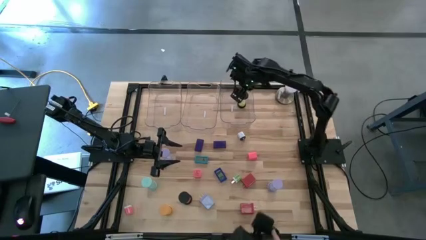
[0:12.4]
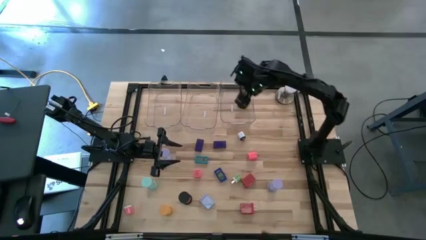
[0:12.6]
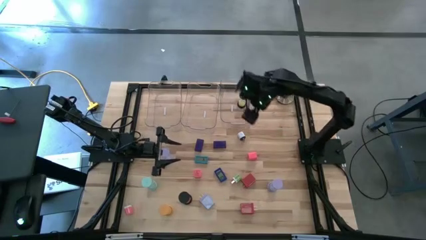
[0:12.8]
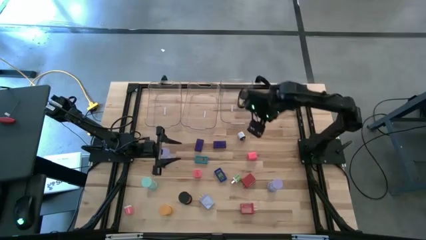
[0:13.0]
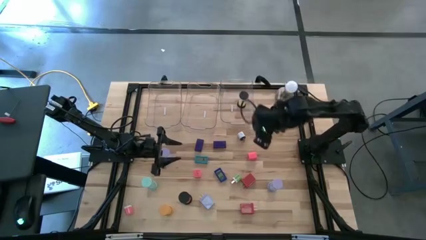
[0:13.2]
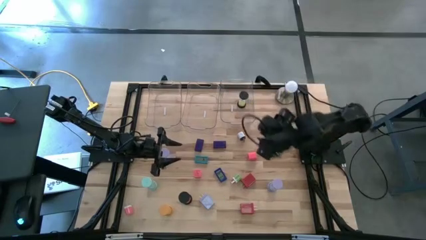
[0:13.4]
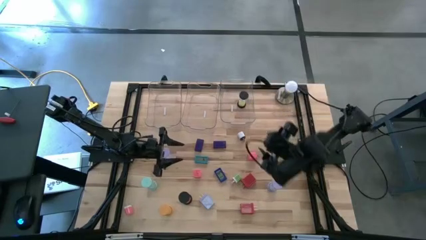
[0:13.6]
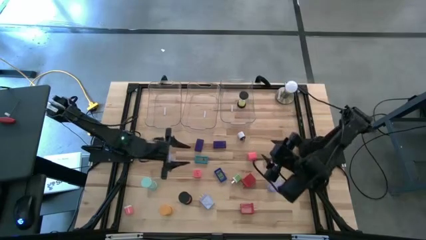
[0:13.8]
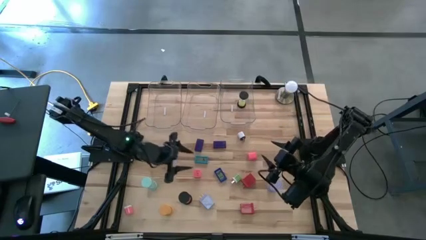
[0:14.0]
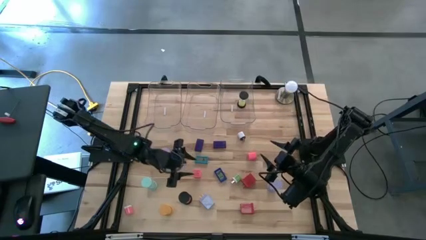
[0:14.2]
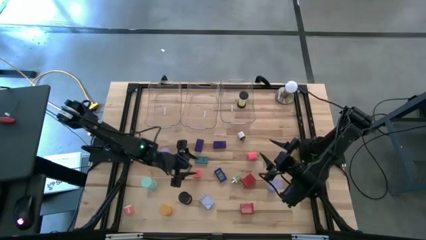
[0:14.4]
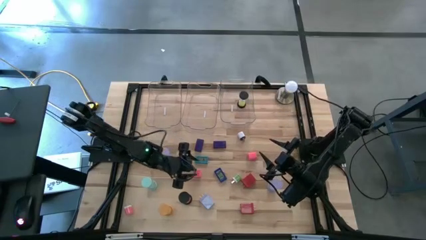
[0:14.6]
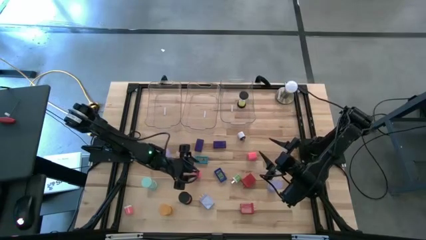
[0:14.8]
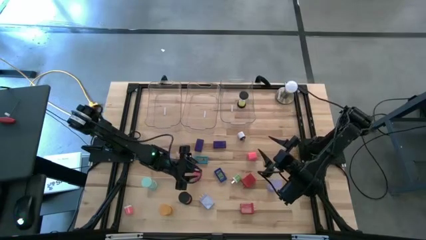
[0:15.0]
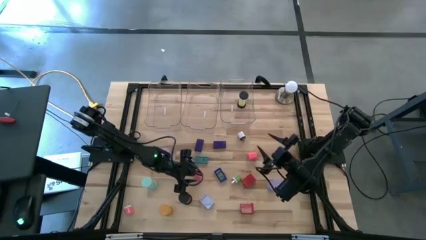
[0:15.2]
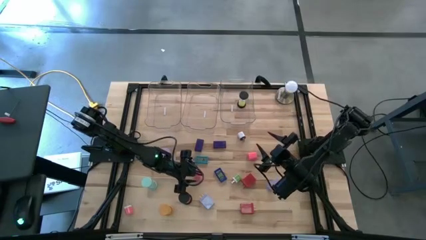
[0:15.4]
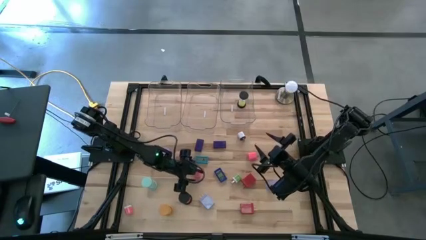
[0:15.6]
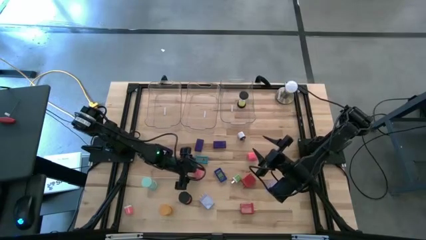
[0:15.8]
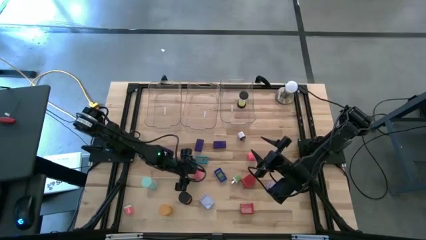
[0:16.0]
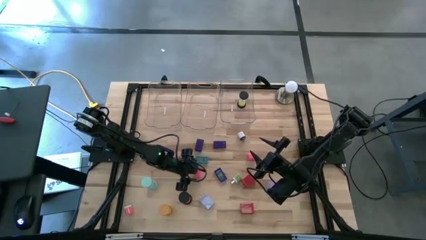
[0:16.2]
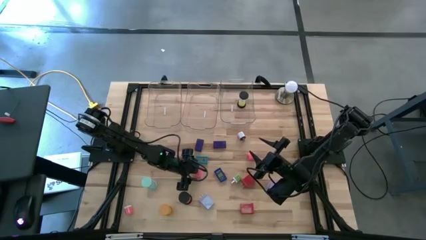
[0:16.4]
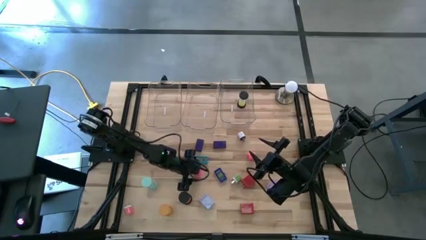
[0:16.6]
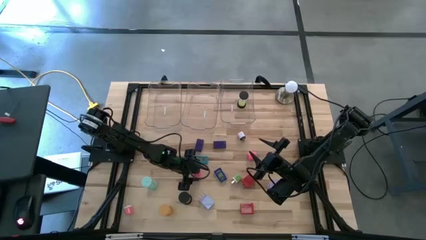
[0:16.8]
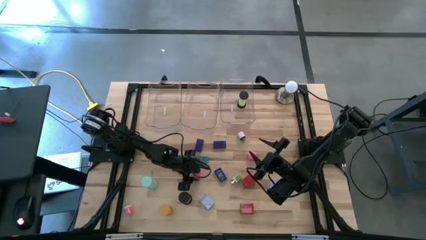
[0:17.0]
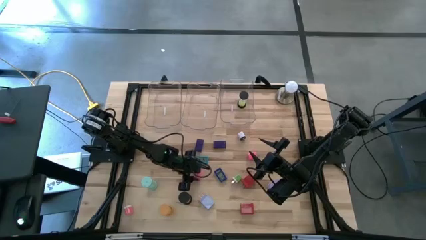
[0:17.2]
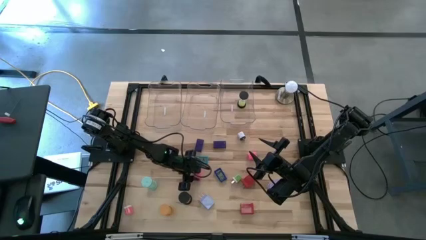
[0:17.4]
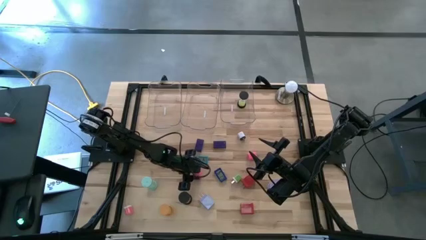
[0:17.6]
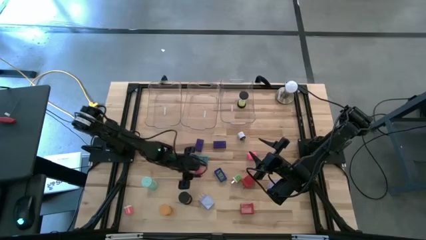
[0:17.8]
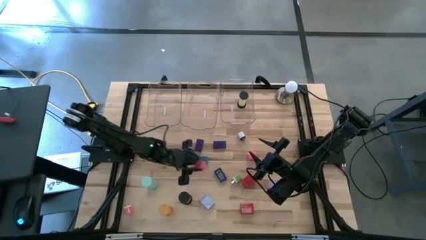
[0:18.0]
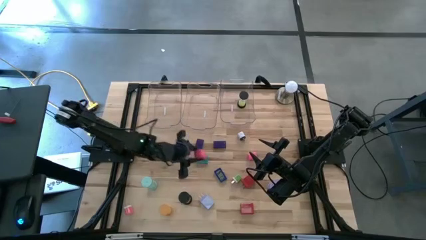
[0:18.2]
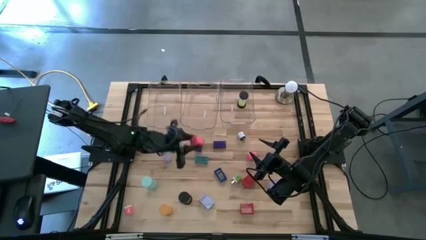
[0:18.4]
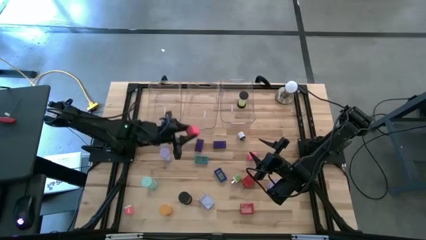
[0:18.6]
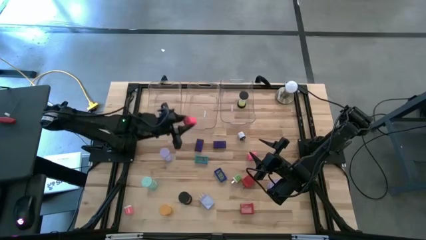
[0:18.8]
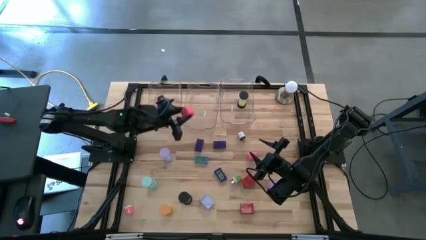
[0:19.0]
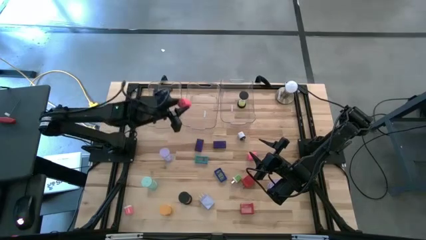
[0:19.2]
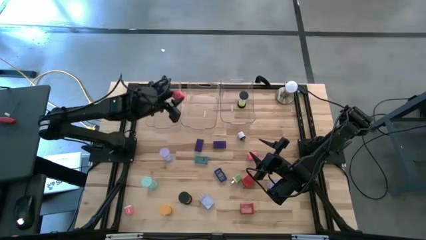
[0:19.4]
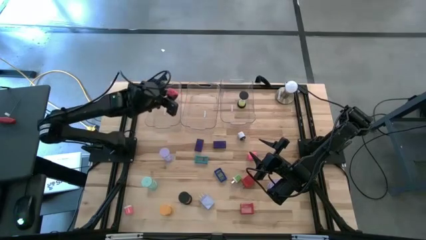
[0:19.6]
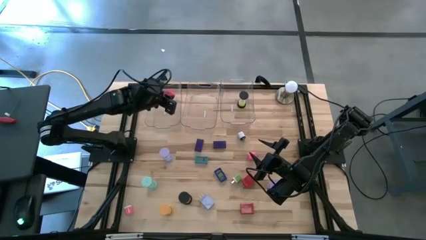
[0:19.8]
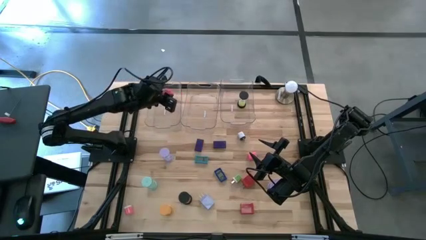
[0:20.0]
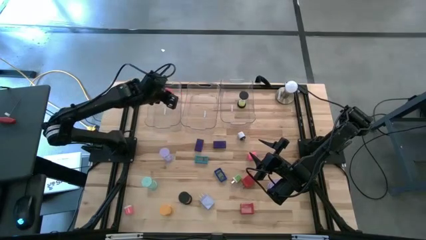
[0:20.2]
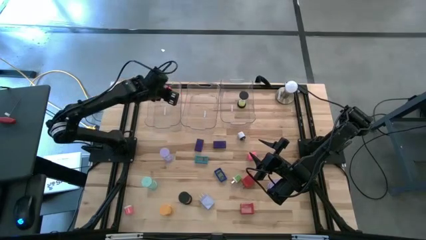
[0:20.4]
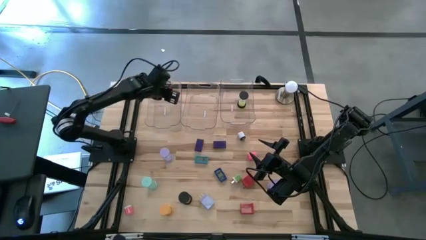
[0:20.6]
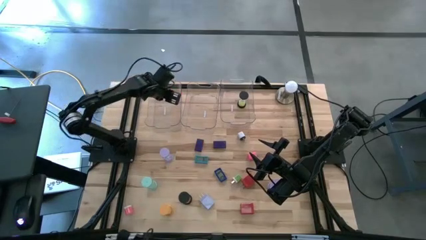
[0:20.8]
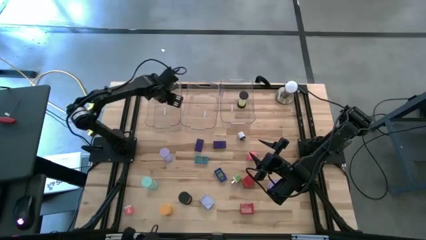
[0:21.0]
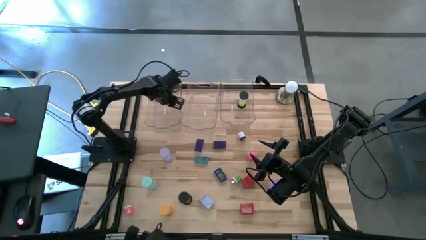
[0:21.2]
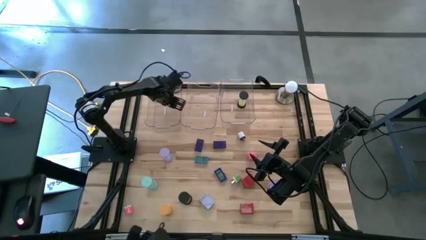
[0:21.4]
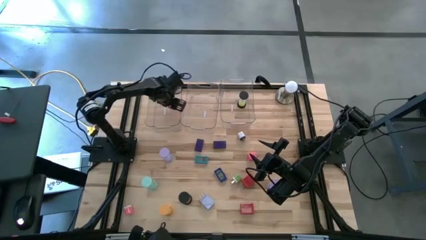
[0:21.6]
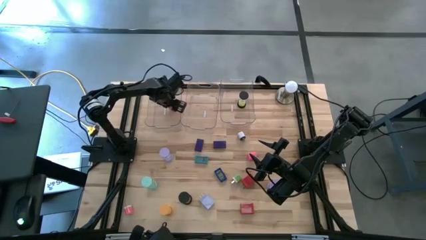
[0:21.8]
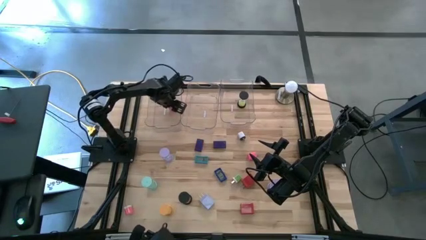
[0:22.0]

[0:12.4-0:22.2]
Task: Pick & Place Office items
Put the middle pink charger adapter into the left transparent bin

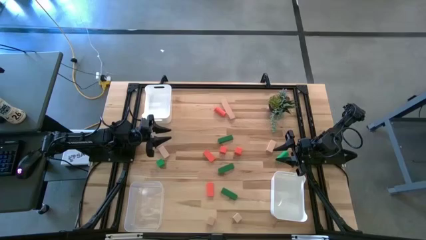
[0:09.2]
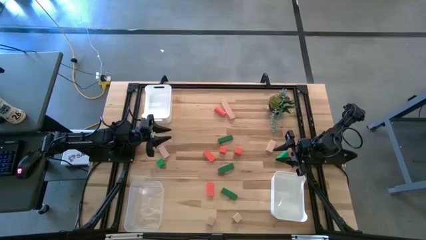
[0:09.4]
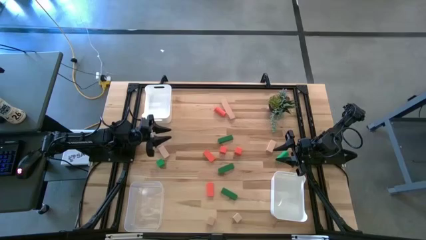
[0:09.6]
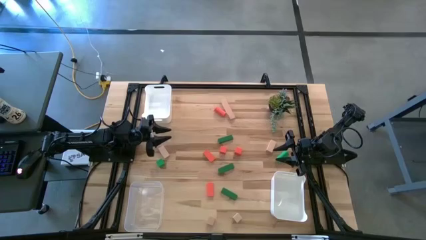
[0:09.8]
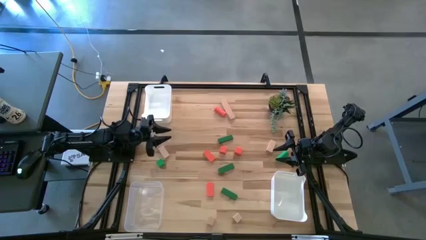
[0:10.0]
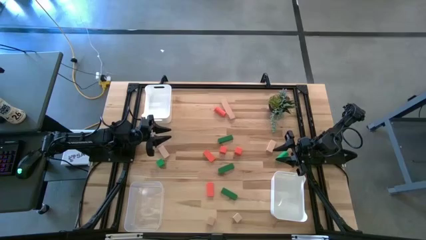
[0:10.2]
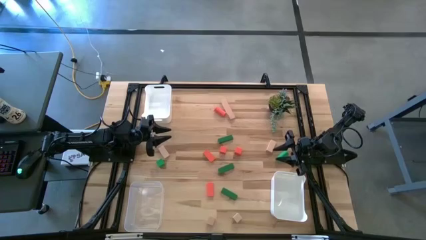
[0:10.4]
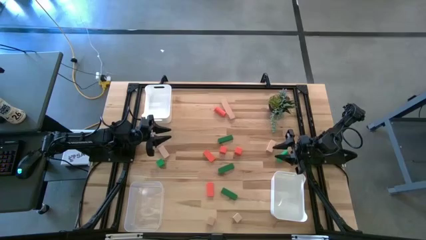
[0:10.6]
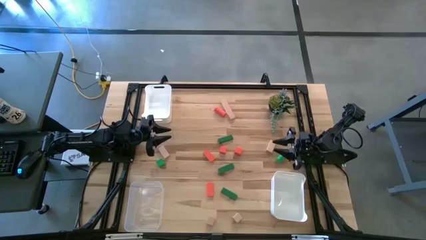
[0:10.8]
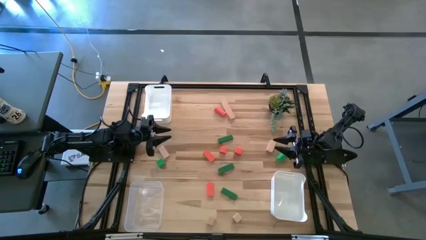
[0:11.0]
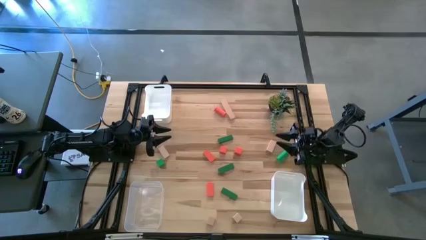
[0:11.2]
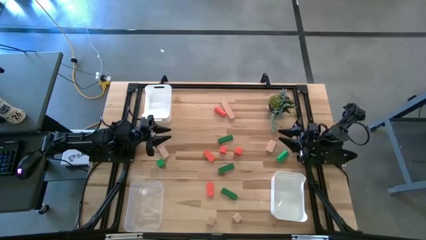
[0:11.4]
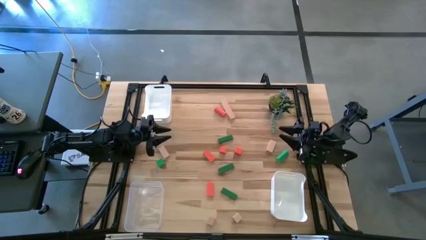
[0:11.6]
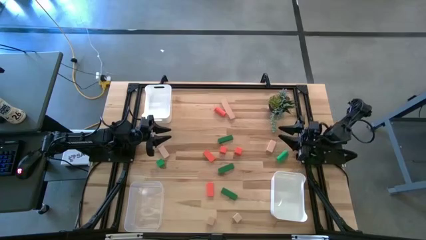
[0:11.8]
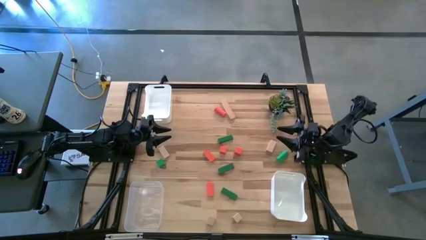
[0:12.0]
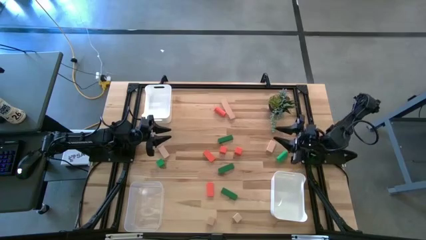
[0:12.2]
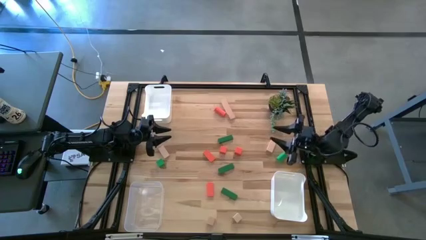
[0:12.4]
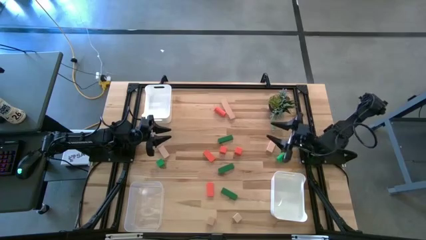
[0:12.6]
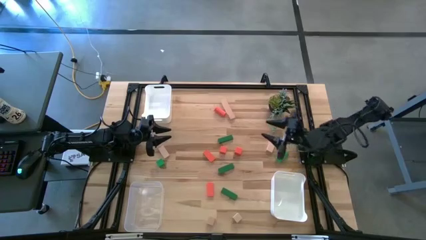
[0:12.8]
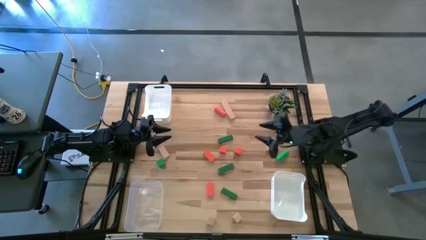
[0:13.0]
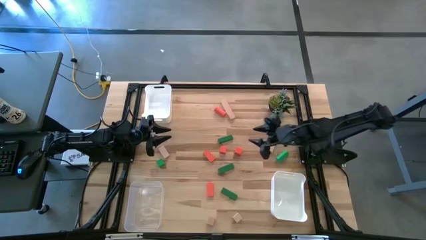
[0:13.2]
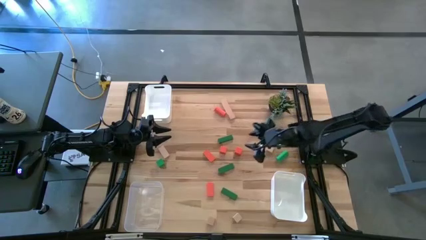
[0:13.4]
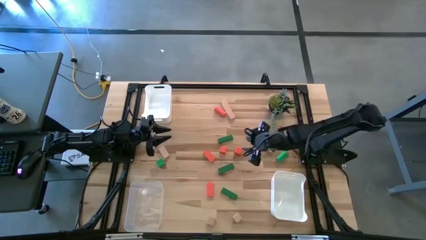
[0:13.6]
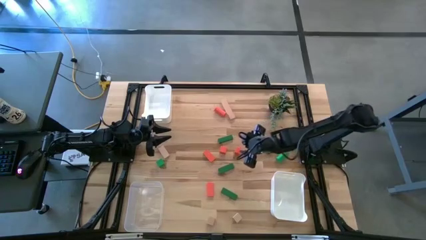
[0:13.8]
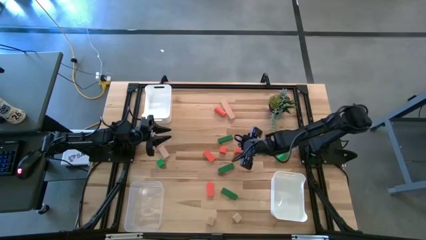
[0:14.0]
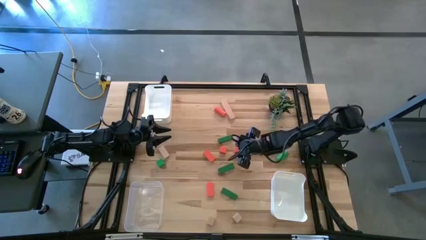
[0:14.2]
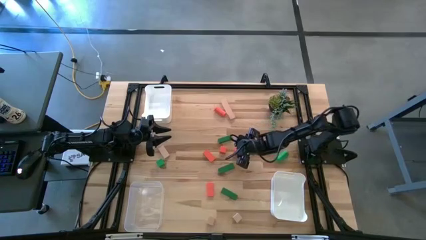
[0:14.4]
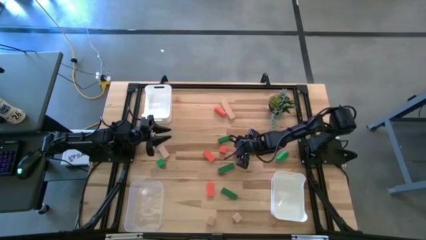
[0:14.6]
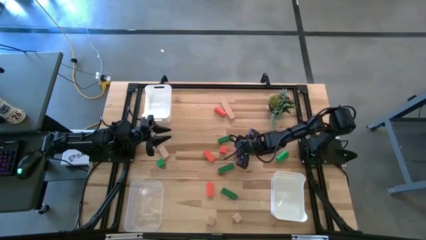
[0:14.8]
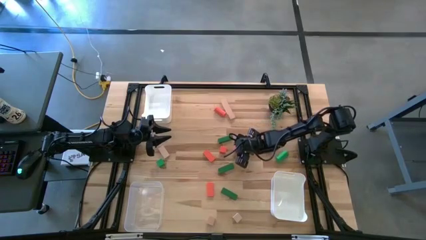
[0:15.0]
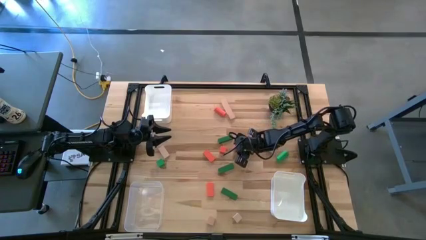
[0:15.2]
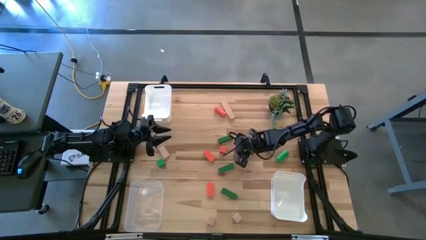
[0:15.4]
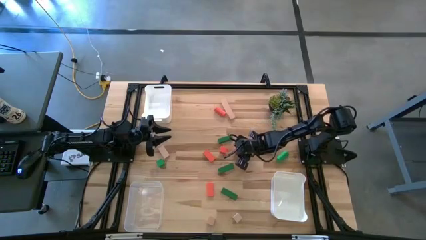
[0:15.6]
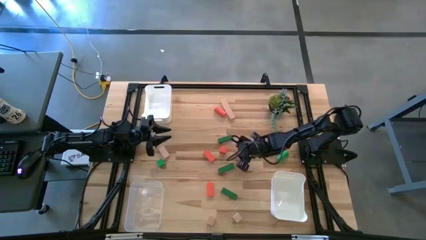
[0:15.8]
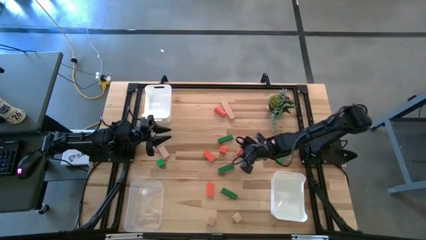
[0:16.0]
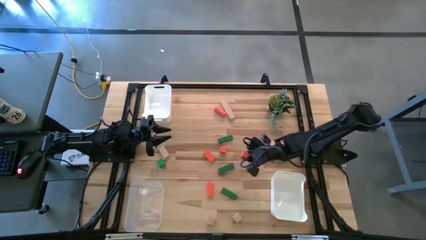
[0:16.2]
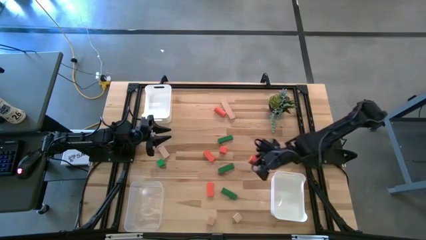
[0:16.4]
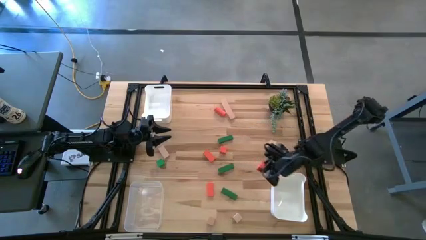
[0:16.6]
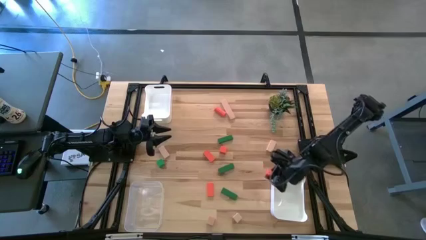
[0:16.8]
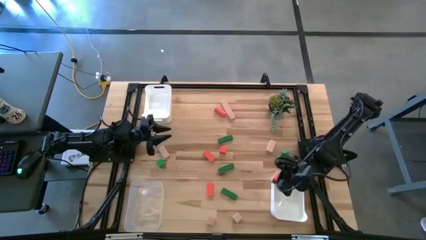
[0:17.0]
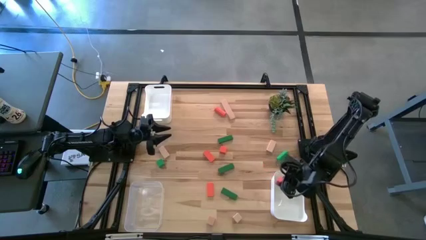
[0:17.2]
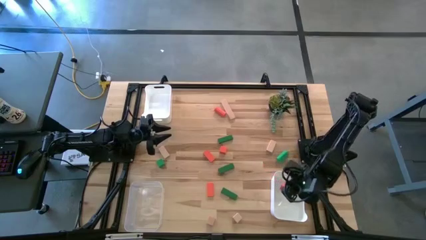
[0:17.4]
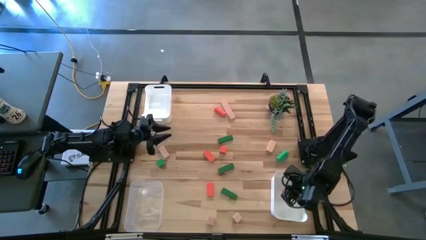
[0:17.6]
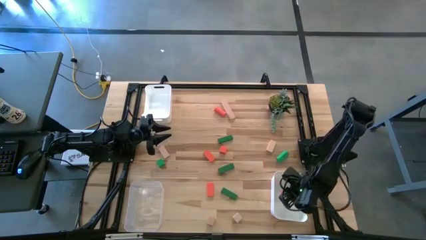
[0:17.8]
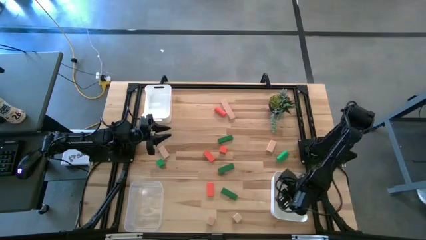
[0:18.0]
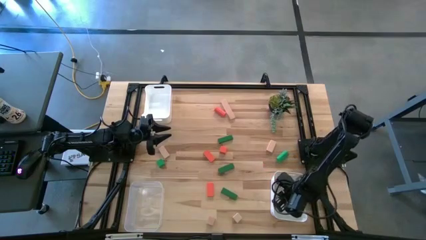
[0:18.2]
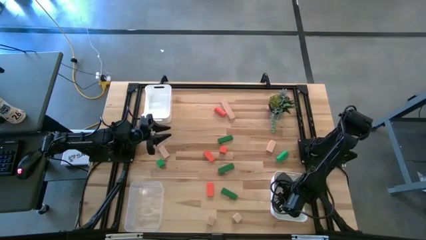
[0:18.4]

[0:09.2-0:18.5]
Task: Sort & place blocks by color
Put the orange block into the bottom white bin
